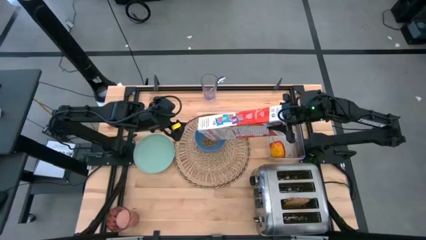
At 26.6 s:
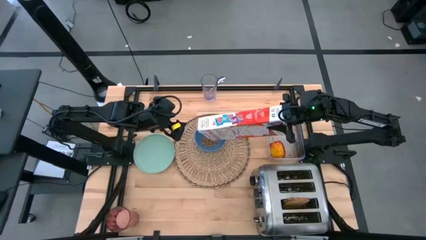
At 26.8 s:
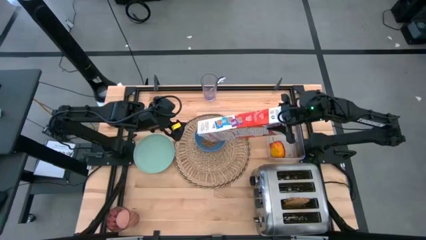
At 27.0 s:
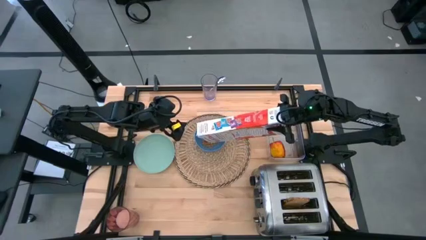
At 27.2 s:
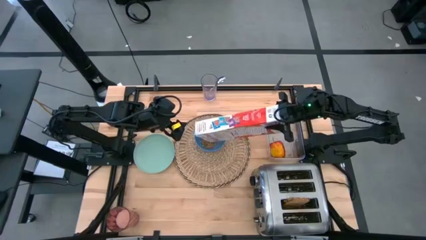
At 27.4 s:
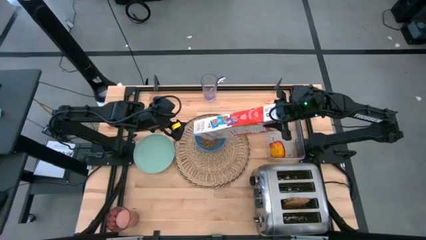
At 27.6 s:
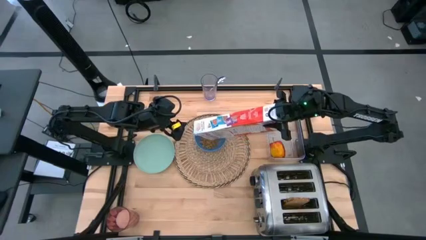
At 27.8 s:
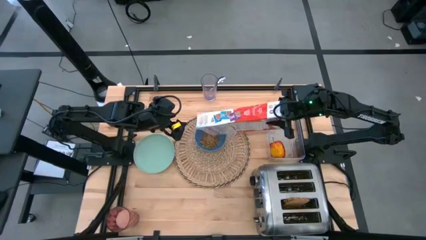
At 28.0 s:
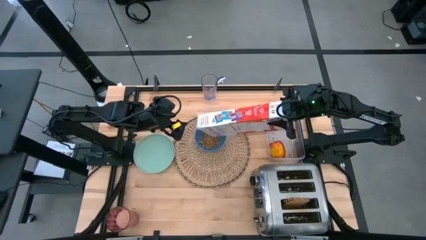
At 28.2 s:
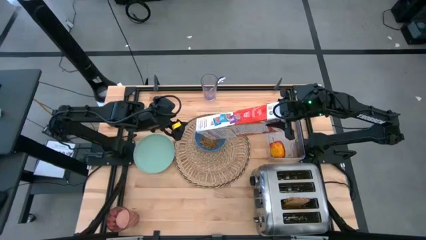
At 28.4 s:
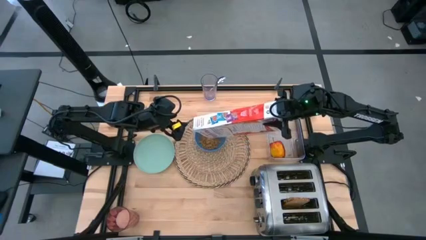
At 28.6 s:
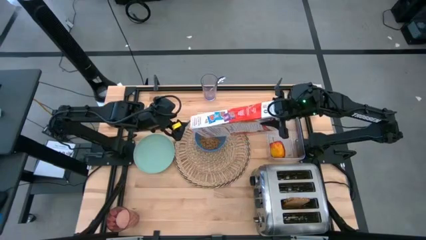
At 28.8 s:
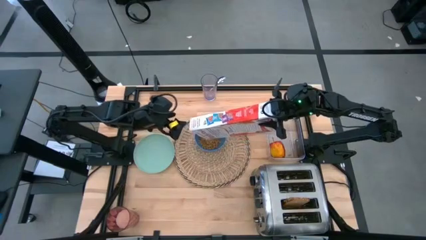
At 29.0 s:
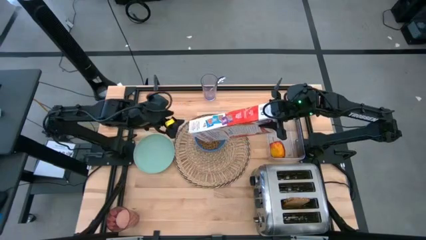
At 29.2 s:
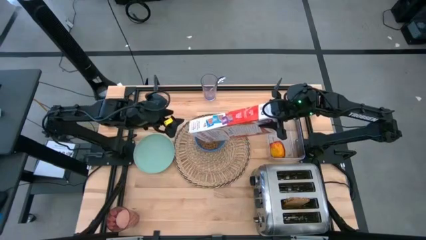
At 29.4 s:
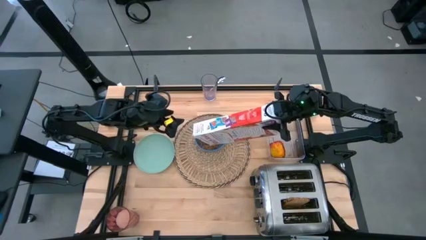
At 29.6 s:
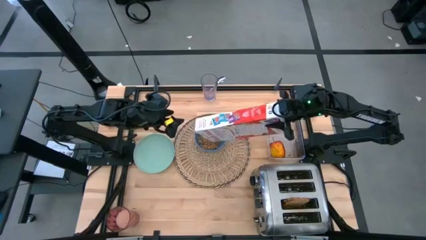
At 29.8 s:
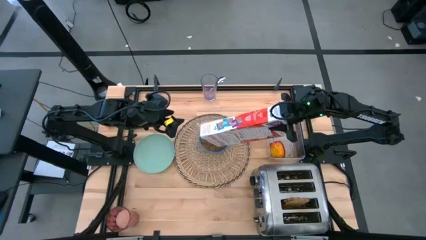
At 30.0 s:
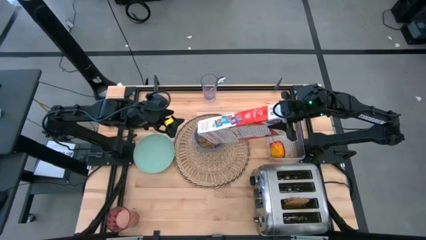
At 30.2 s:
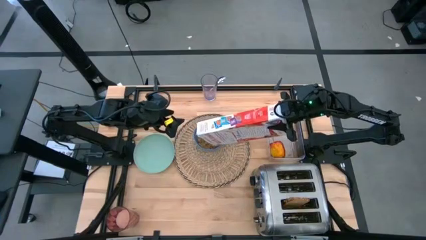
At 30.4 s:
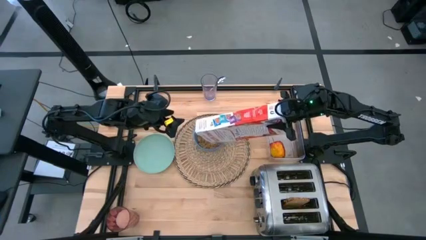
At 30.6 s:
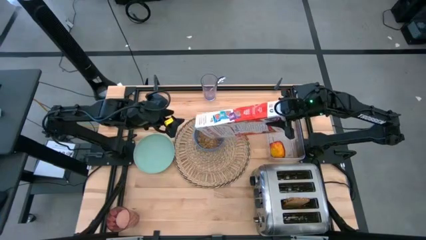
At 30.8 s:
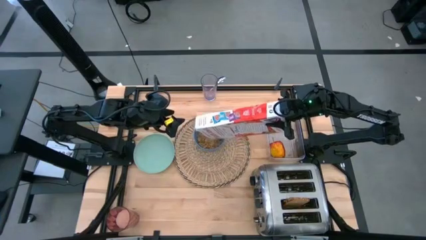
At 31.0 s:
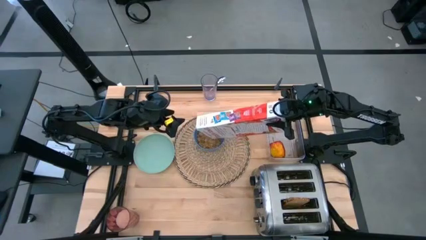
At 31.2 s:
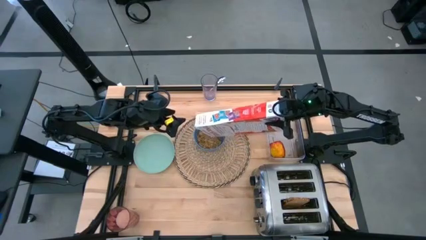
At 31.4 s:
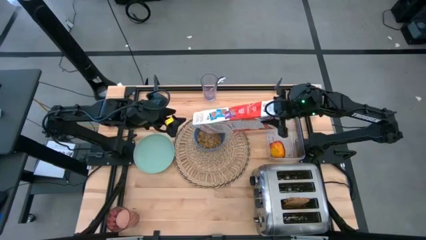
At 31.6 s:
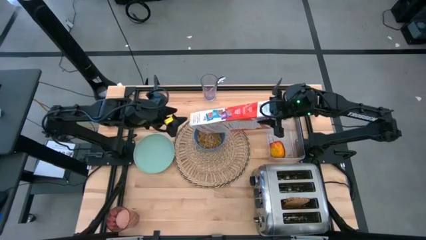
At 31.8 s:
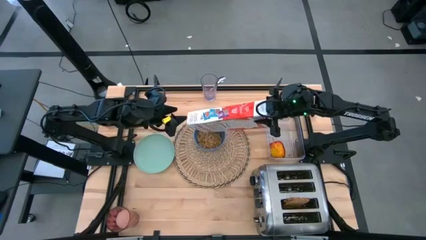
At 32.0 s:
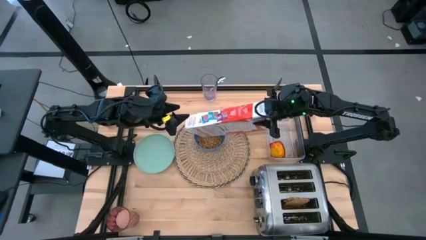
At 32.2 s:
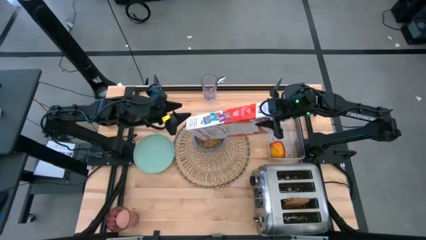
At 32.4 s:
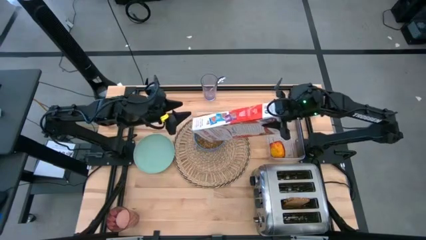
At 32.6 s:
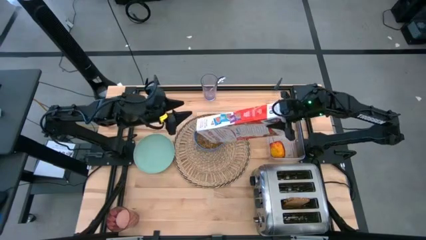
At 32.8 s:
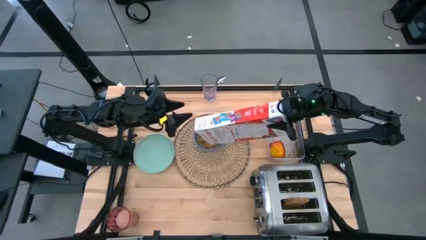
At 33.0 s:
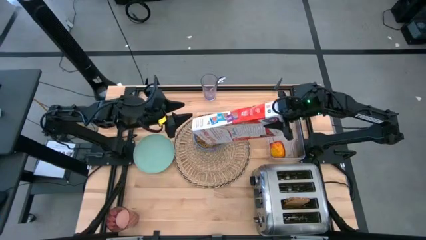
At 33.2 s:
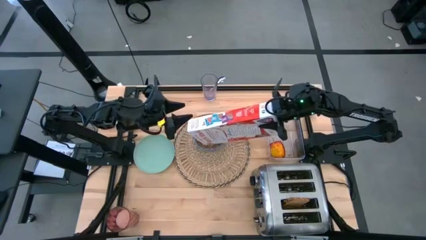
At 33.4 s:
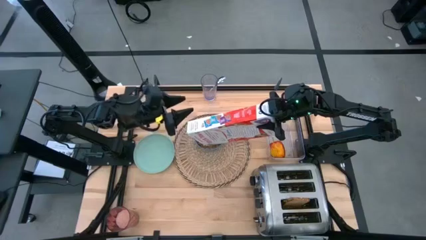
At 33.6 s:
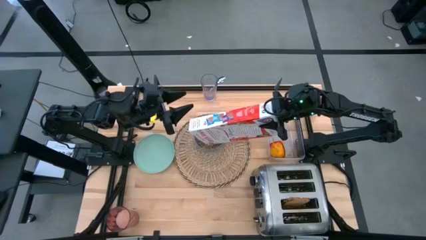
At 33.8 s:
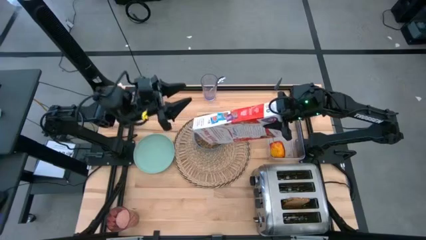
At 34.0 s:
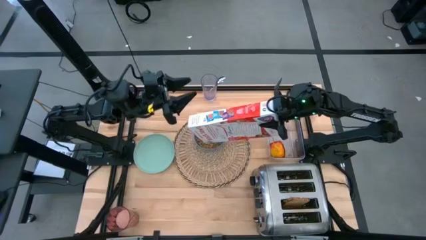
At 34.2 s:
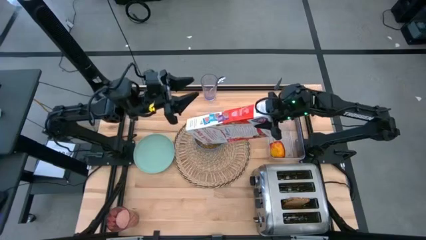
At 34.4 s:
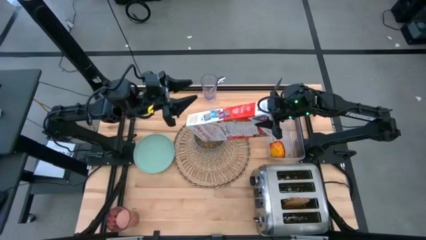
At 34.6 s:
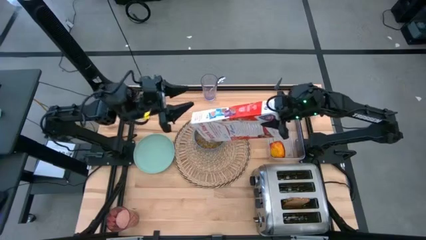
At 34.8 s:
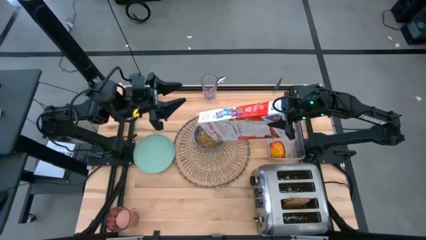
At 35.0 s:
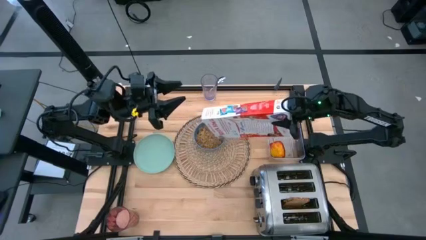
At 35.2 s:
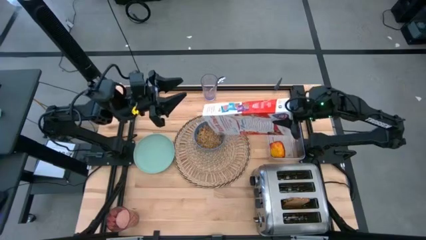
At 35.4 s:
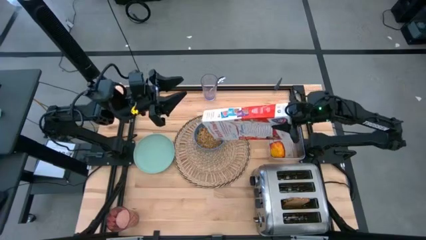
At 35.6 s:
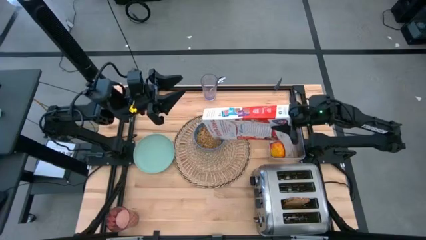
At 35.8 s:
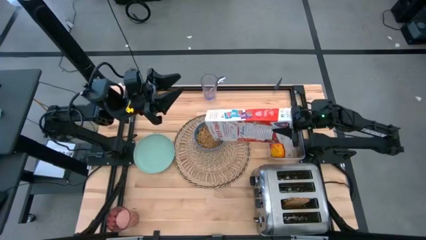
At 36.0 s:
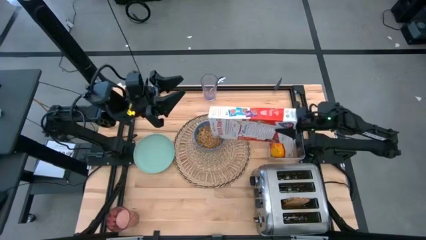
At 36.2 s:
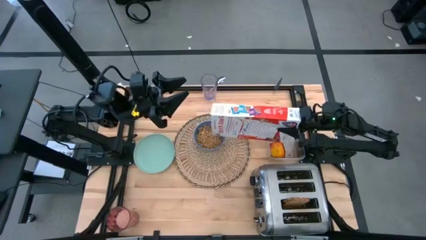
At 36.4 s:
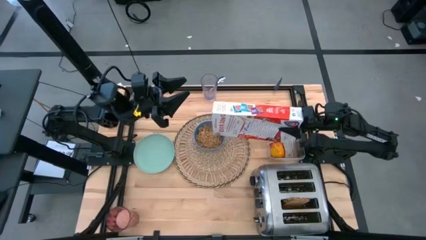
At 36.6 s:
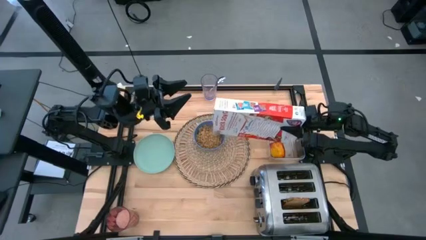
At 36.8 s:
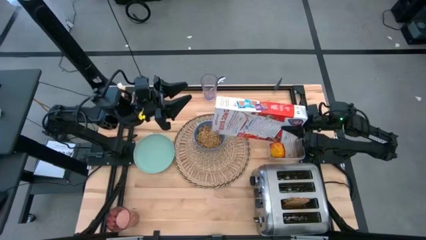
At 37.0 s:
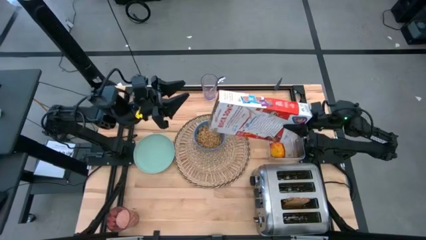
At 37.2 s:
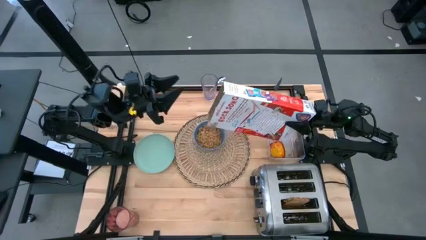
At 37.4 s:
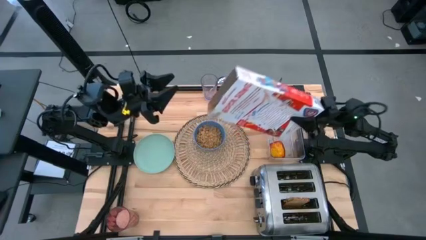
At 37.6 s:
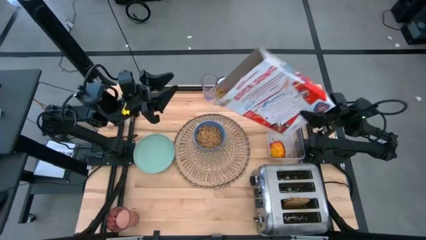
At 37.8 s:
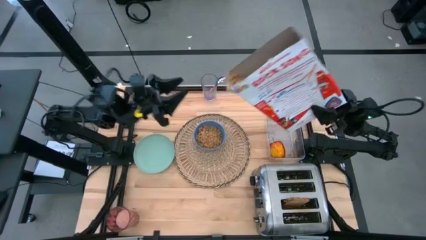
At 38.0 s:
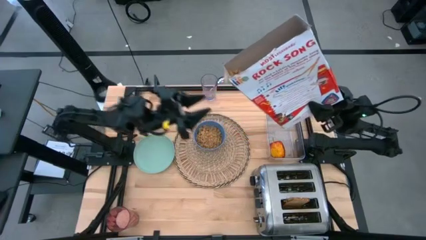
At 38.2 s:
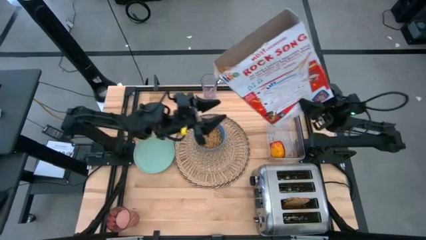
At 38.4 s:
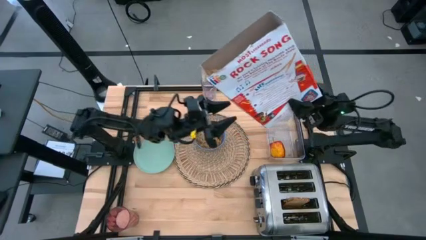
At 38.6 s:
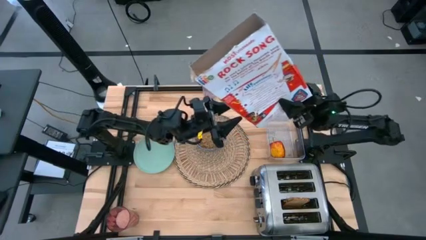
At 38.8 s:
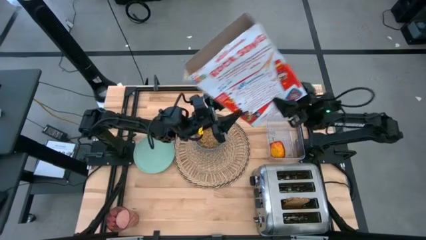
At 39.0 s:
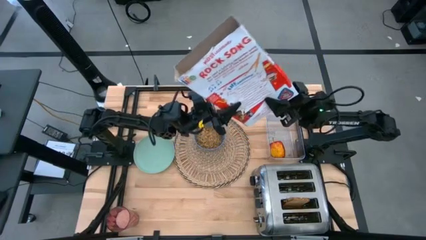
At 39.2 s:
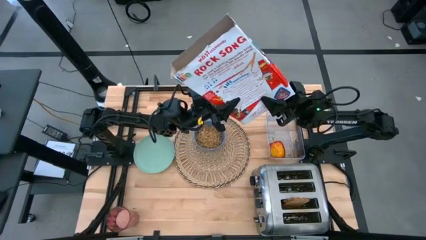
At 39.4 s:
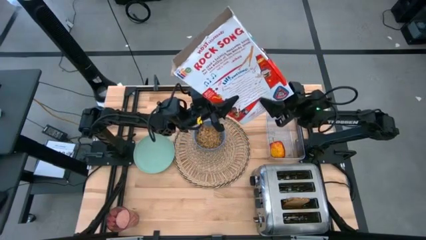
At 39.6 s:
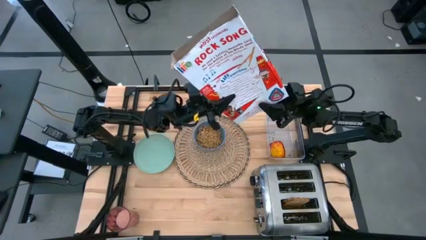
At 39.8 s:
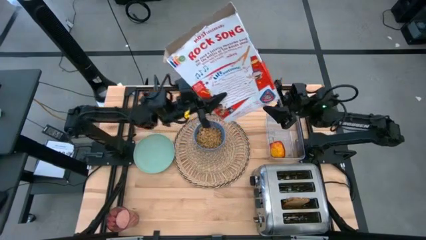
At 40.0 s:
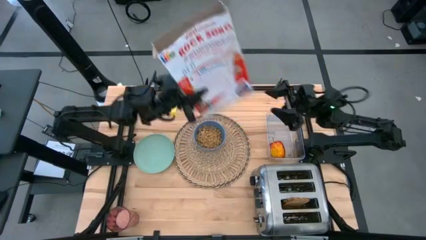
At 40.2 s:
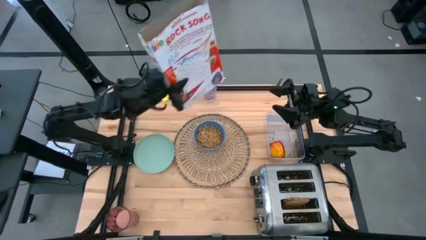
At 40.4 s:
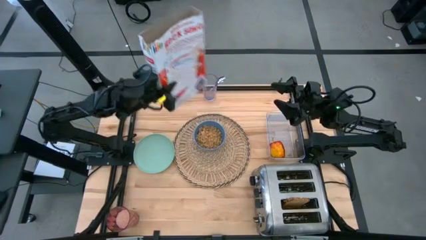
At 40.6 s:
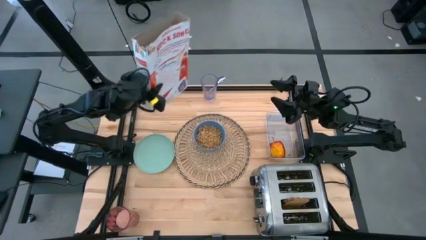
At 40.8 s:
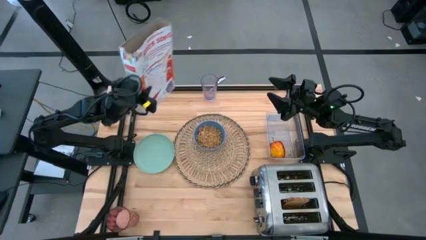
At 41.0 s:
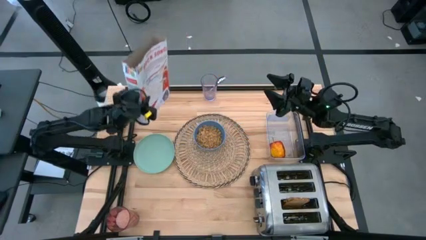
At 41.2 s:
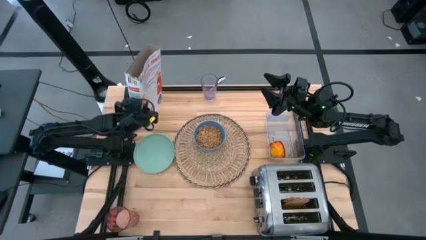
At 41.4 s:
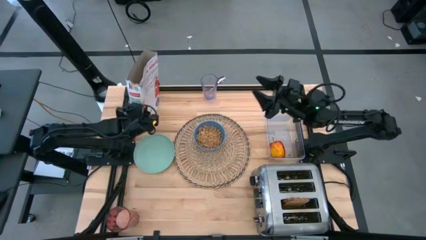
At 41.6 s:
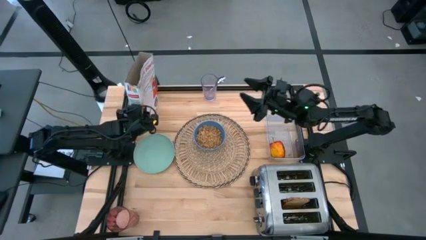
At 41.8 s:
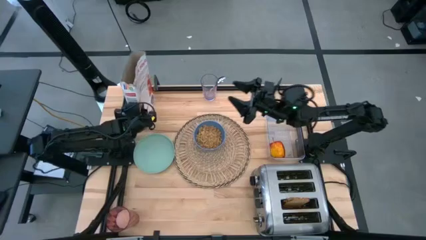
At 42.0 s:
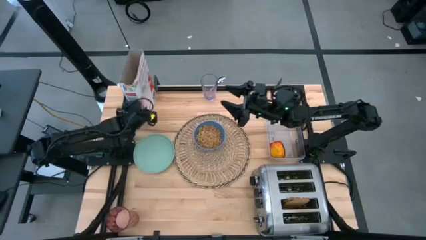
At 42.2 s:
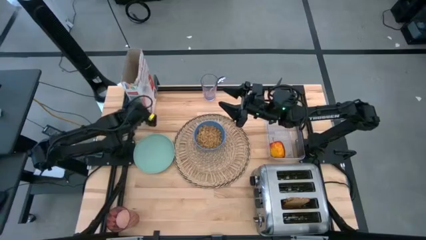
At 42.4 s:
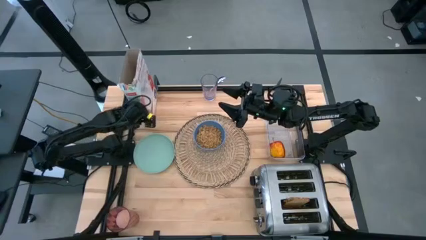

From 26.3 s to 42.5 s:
Task: Arrange a breakfast setting
Pour the cereal into the bowl
